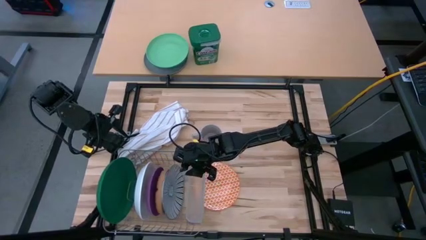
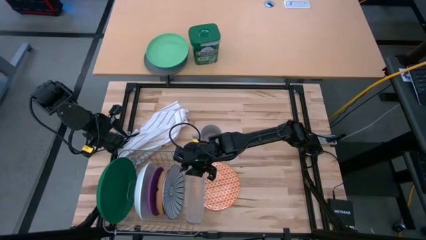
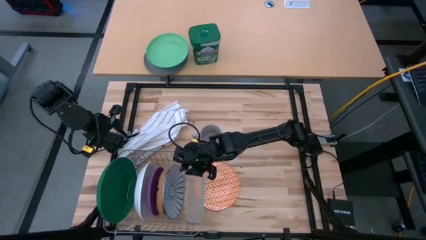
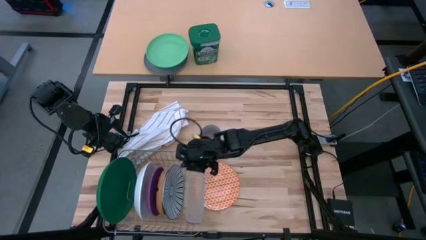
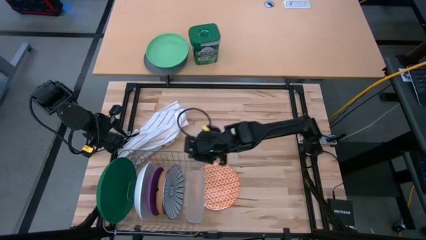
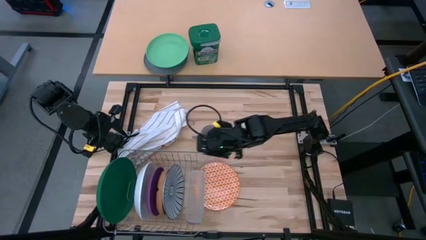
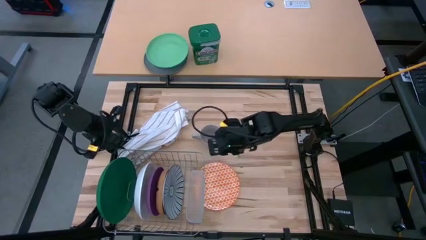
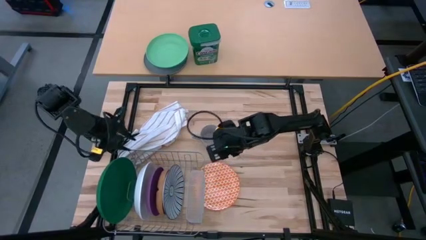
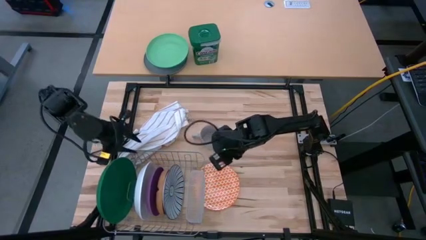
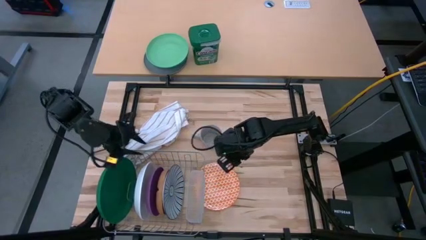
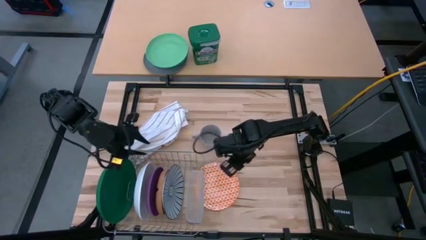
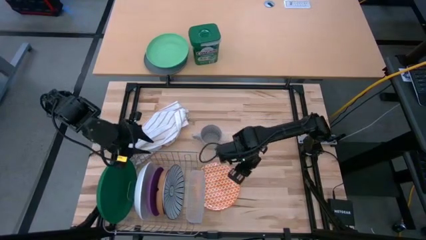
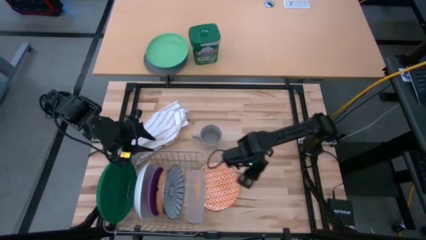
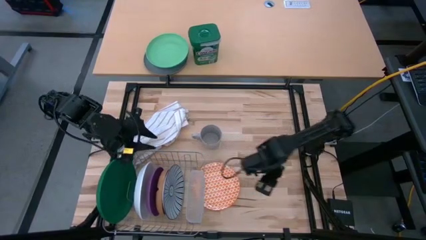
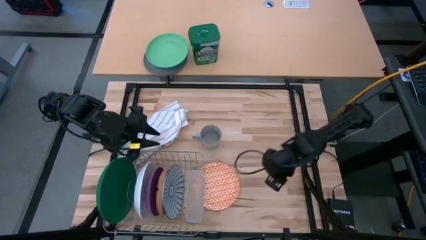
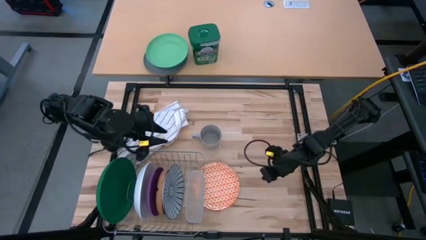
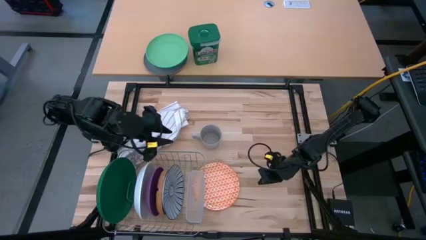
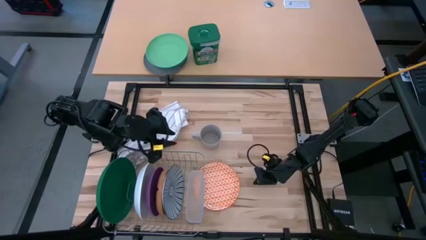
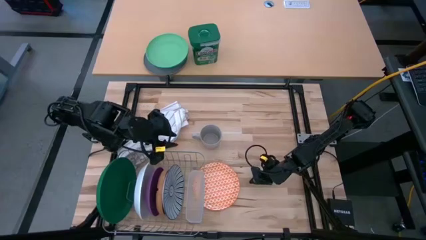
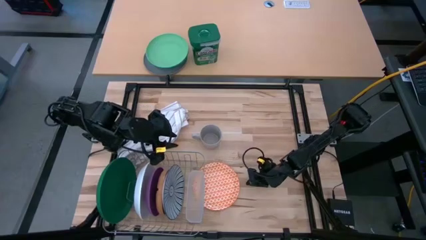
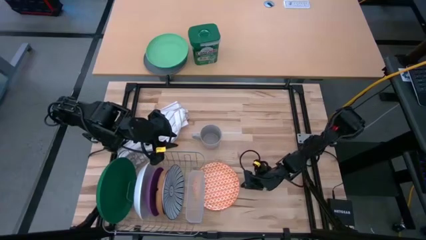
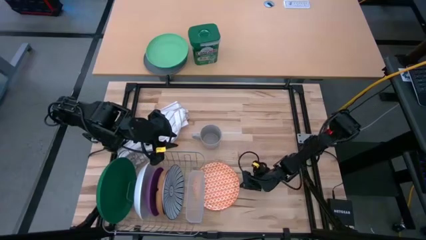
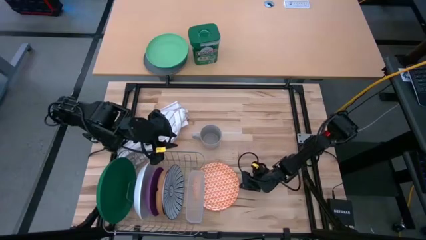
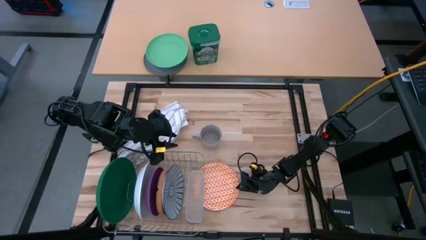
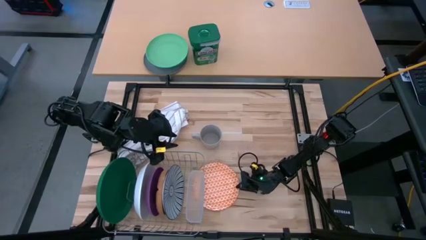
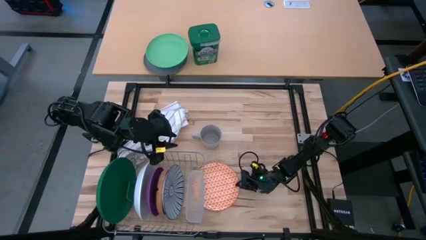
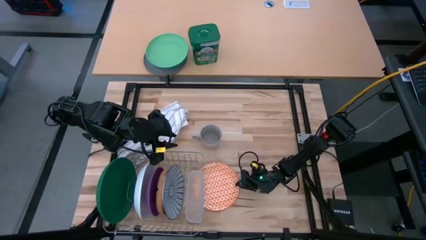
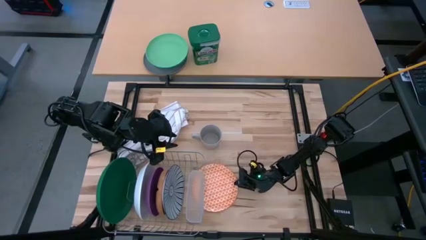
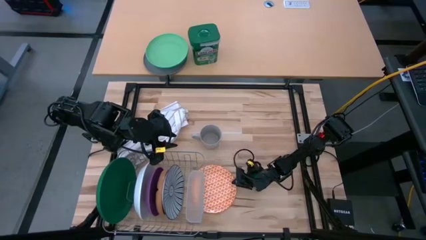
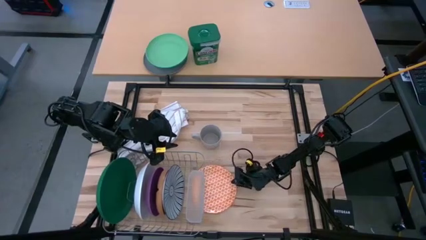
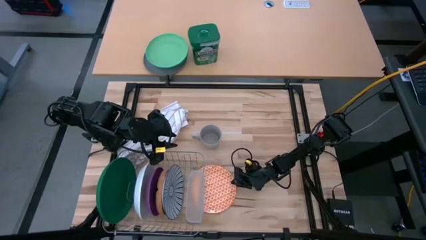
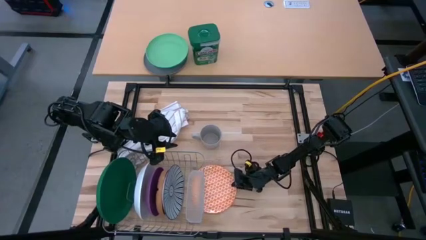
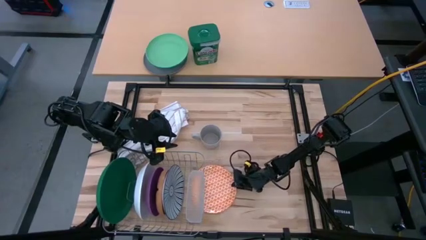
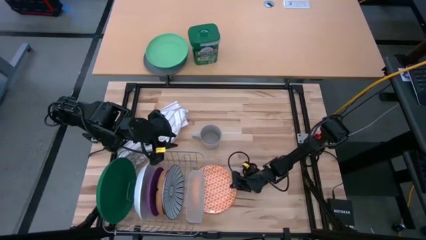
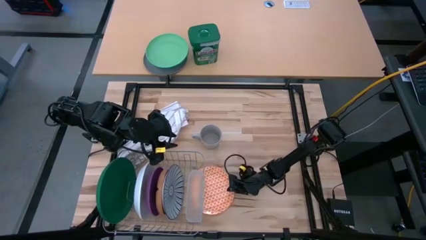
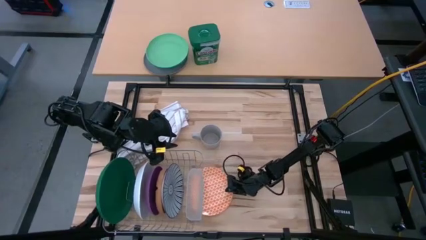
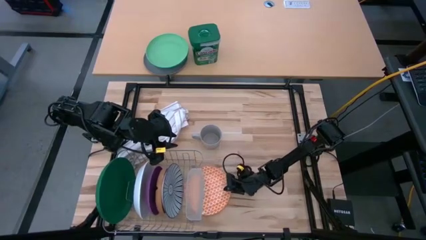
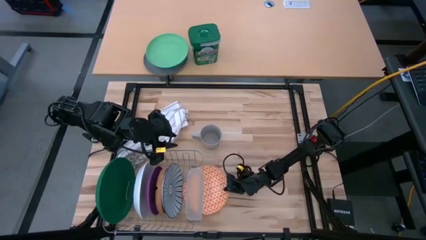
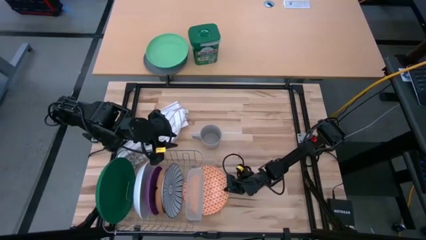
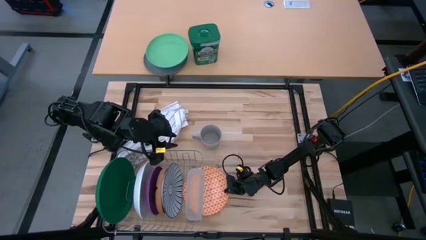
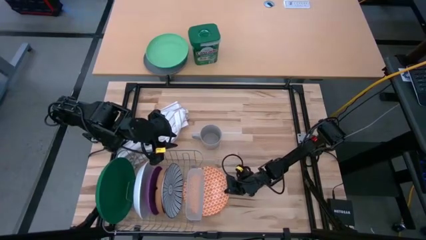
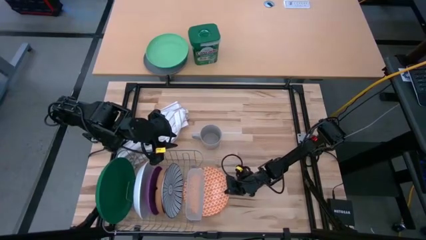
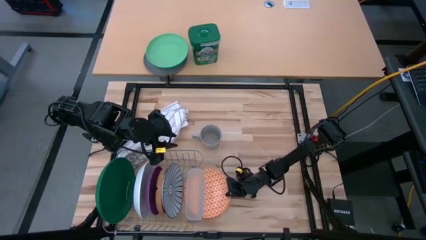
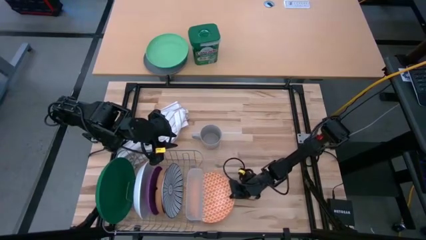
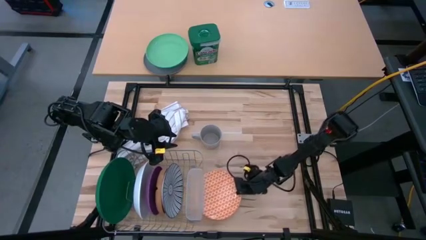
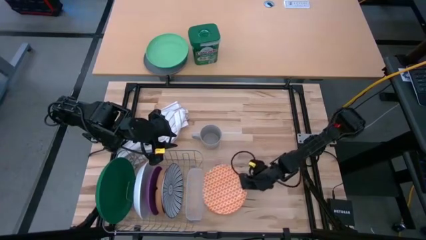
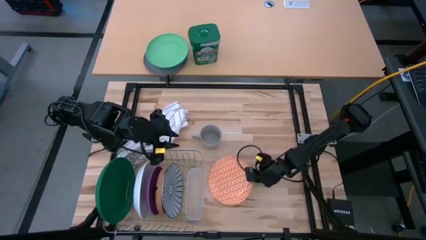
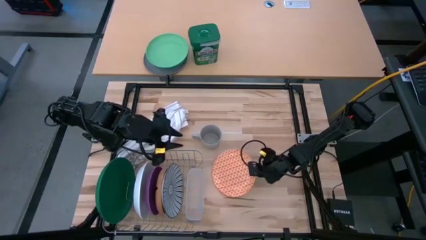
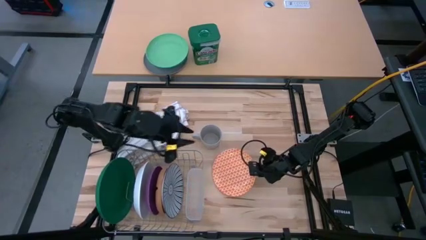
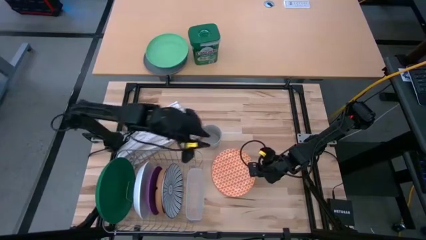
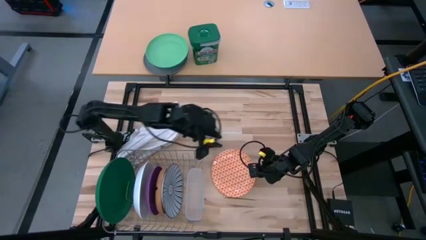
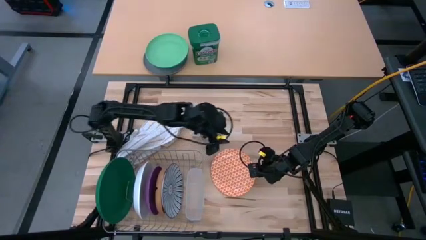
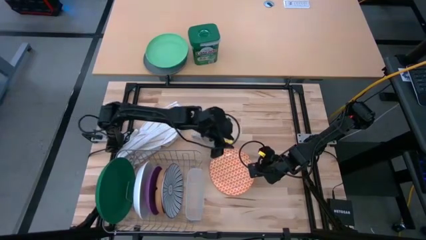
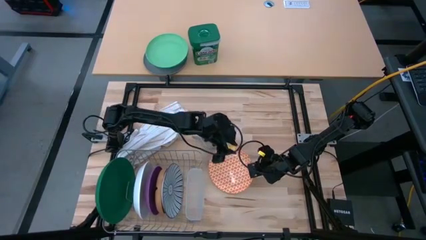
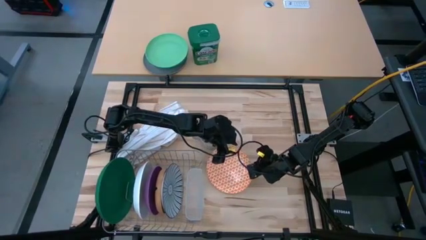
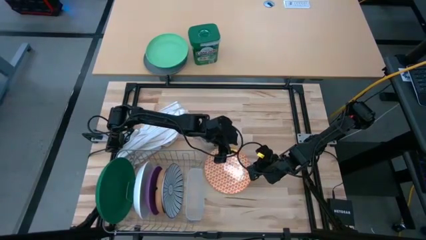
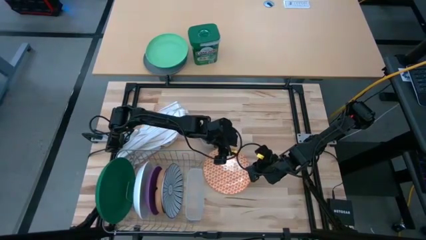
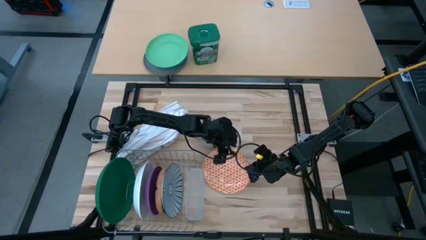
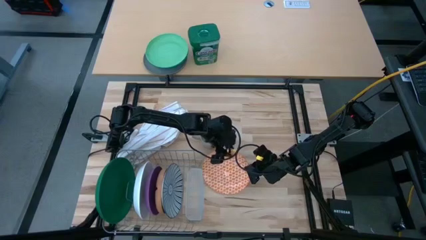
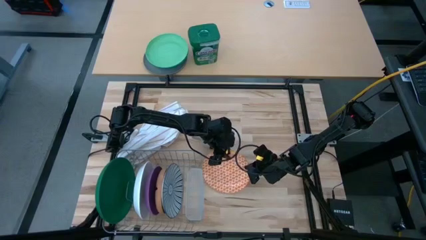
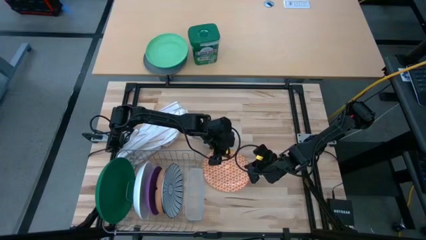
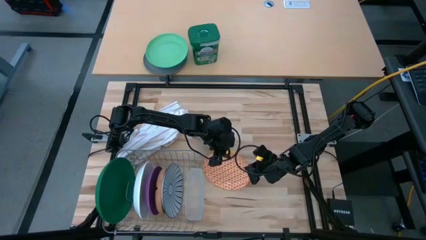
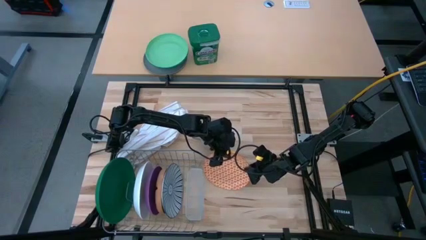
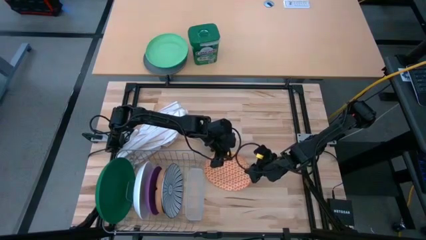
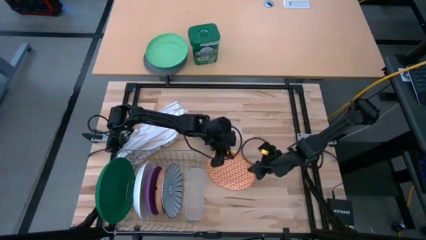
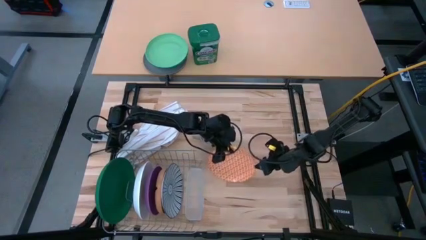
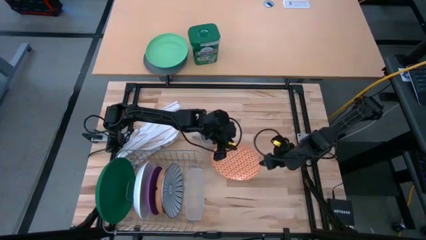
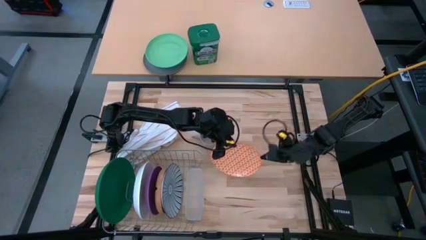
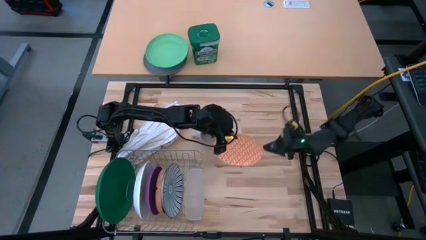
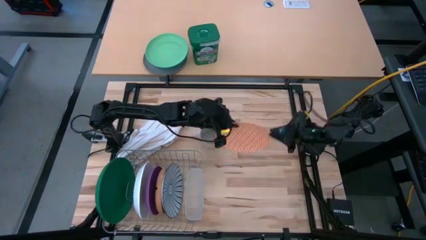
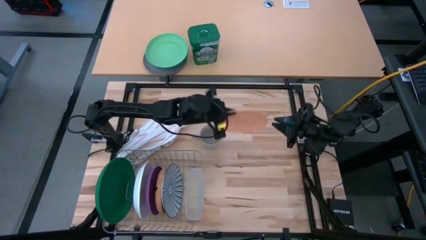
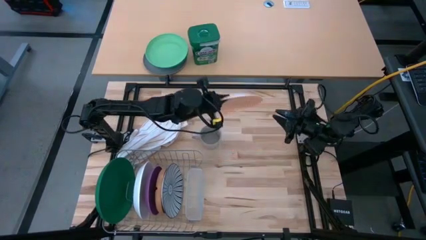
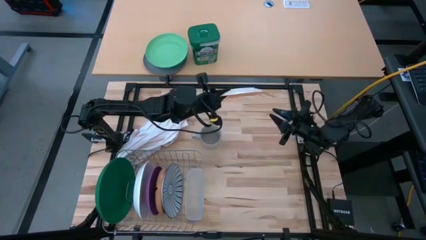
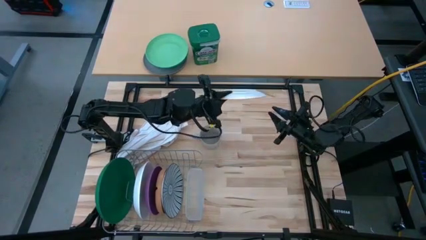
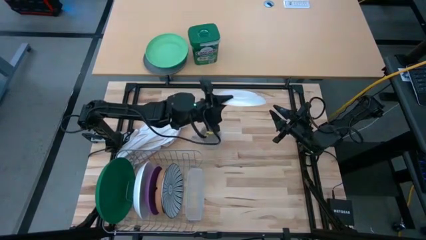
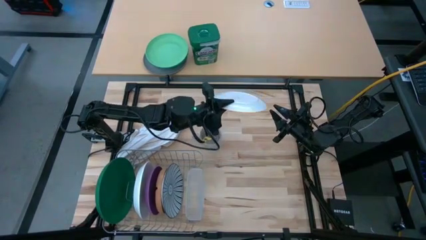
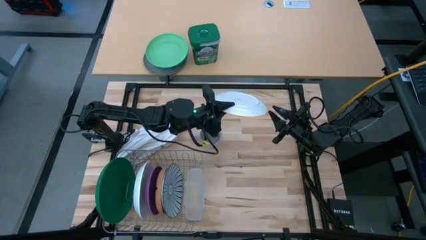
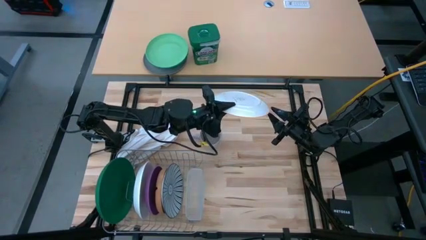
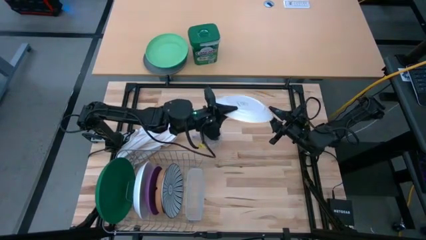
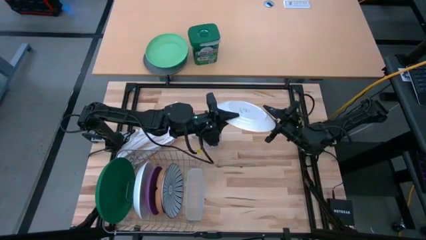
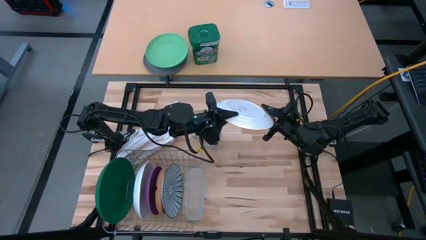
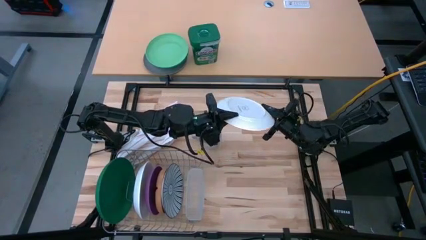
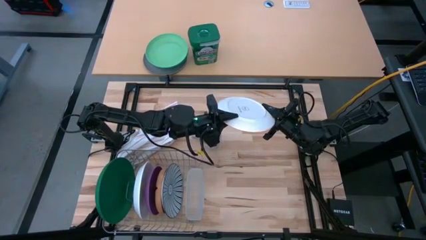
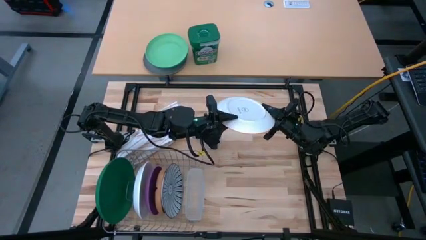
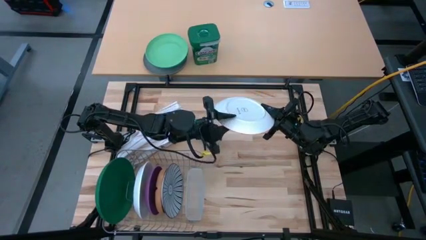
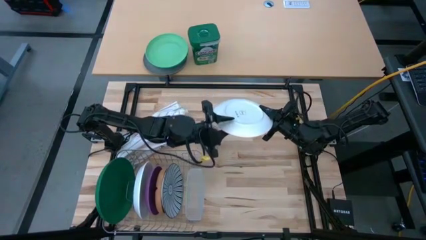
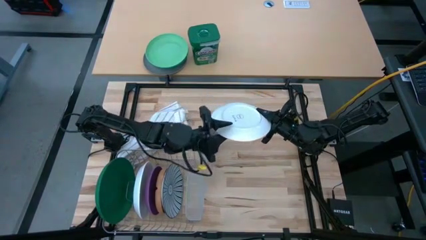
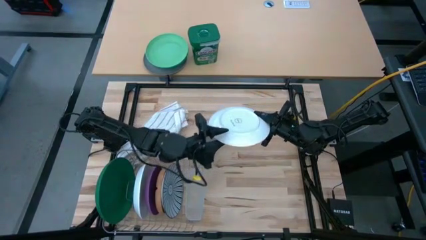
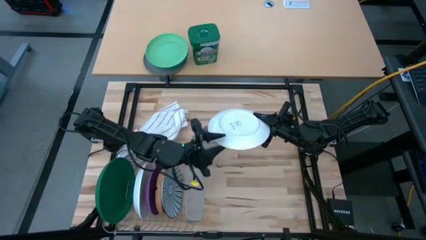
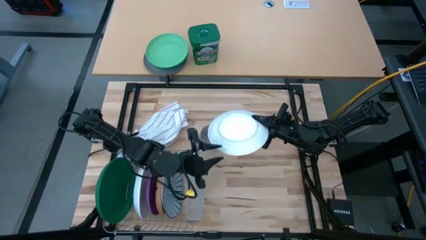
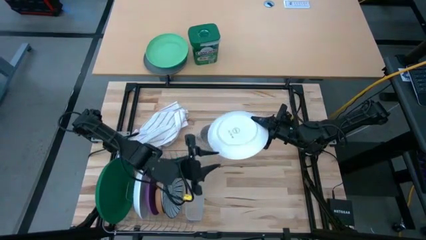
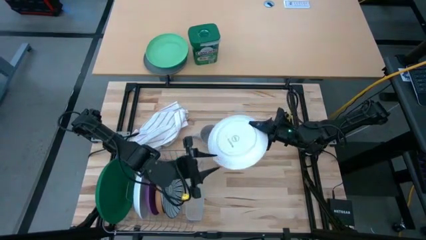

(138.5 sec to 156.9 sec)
Task: Sort dishes
Put the orange patterned plate into the dish rack
